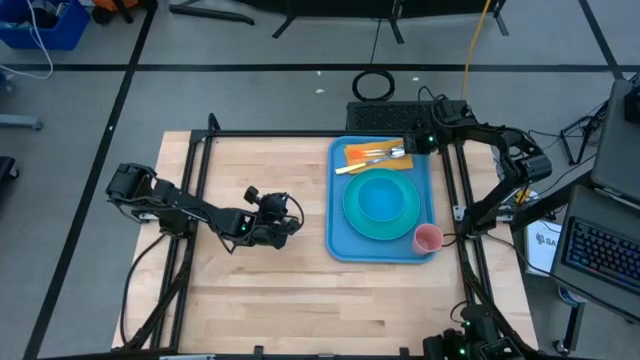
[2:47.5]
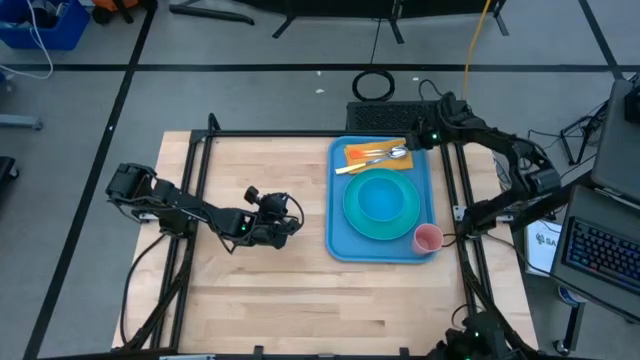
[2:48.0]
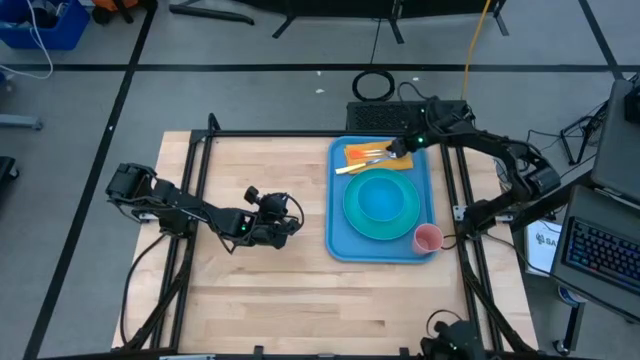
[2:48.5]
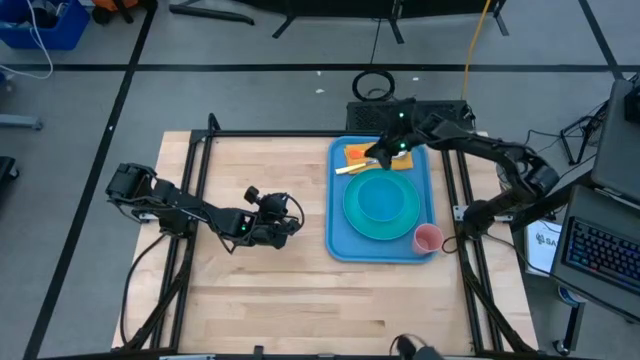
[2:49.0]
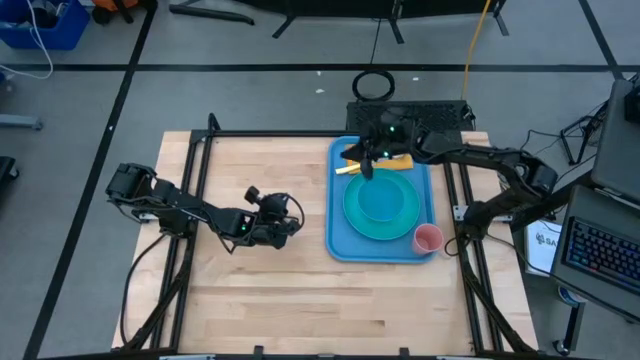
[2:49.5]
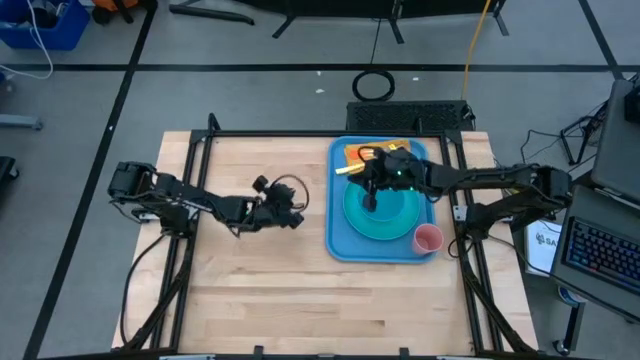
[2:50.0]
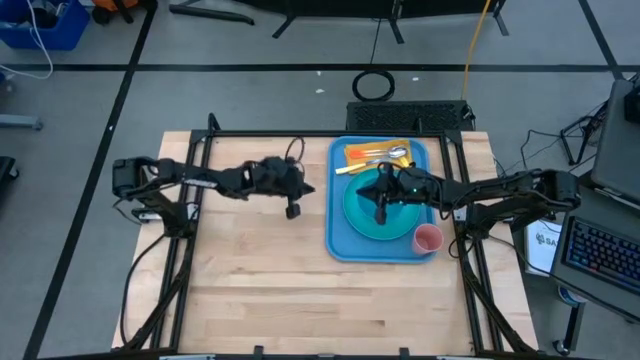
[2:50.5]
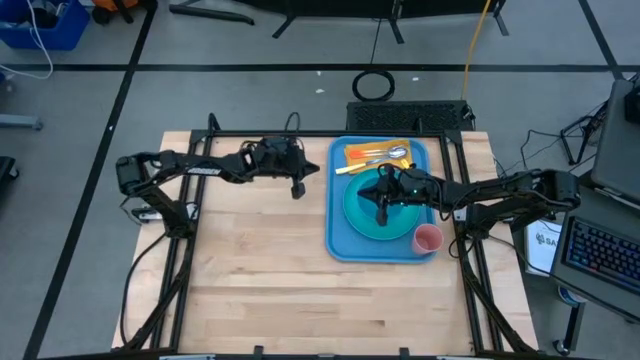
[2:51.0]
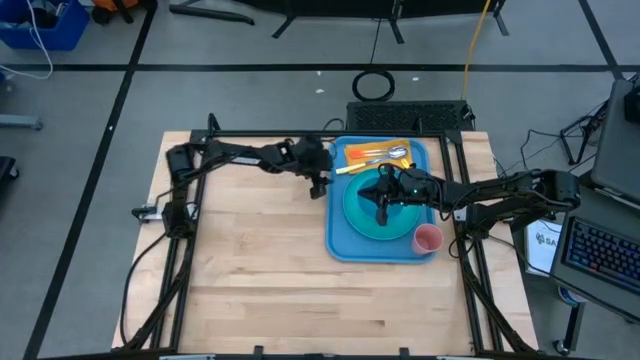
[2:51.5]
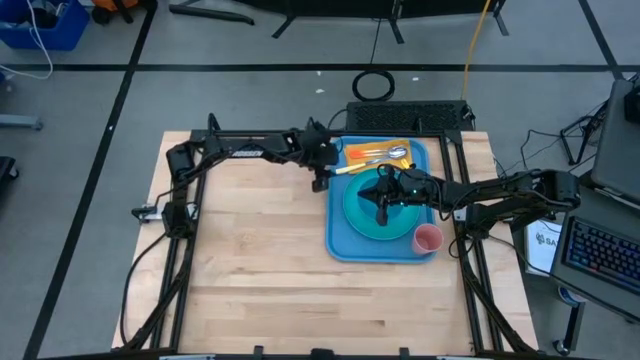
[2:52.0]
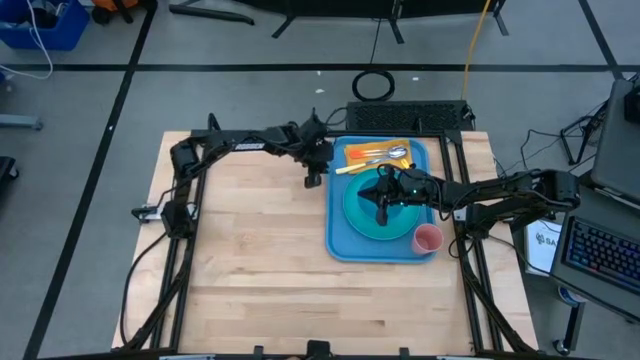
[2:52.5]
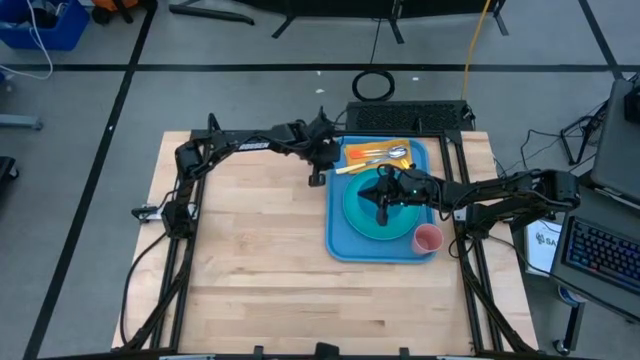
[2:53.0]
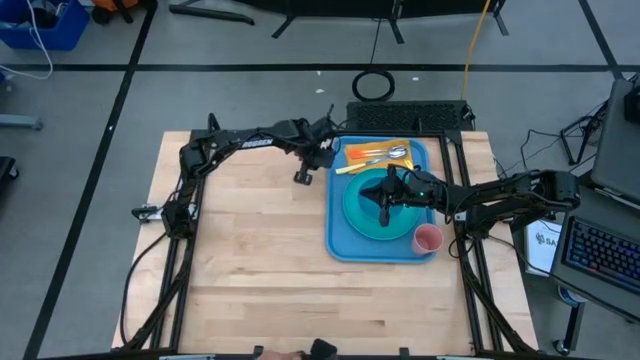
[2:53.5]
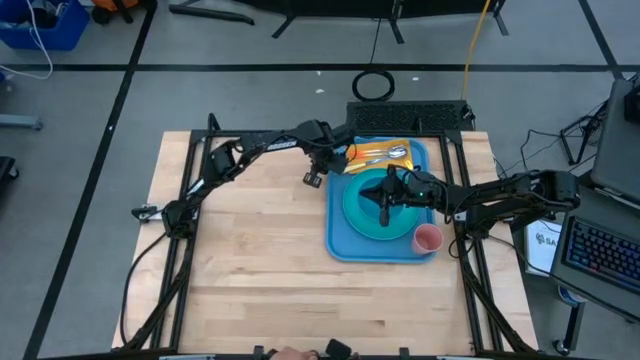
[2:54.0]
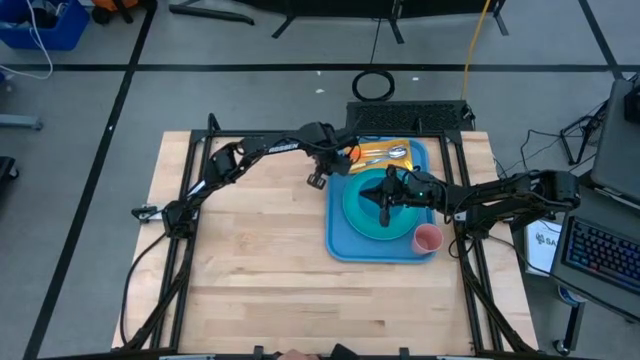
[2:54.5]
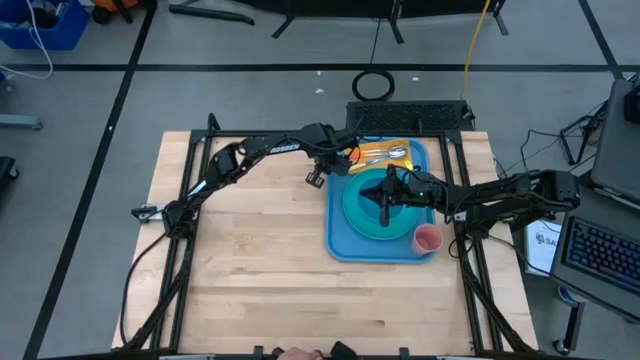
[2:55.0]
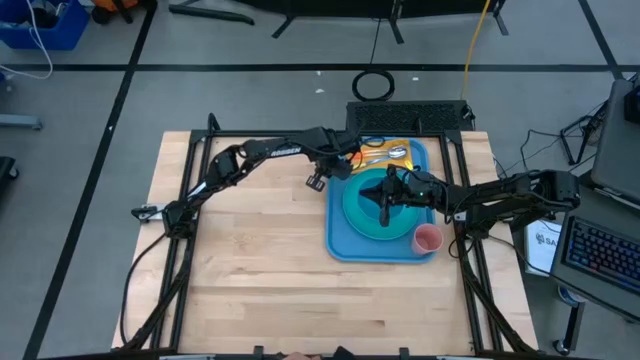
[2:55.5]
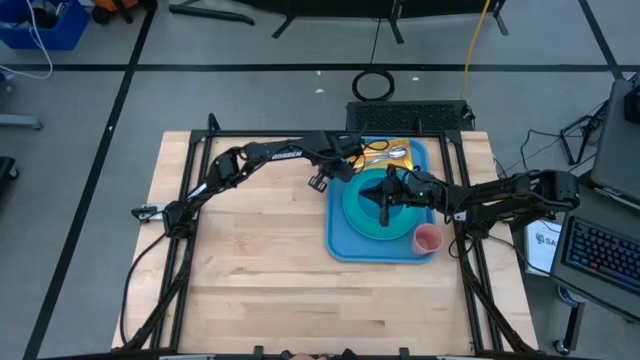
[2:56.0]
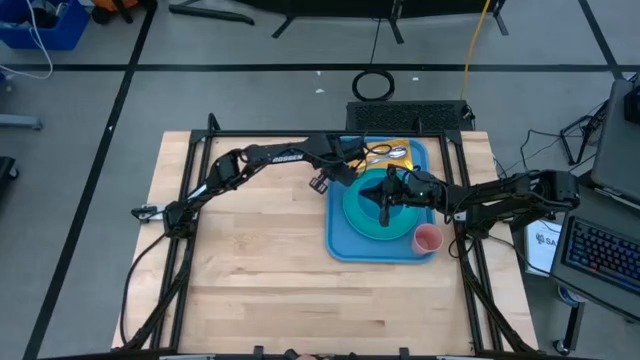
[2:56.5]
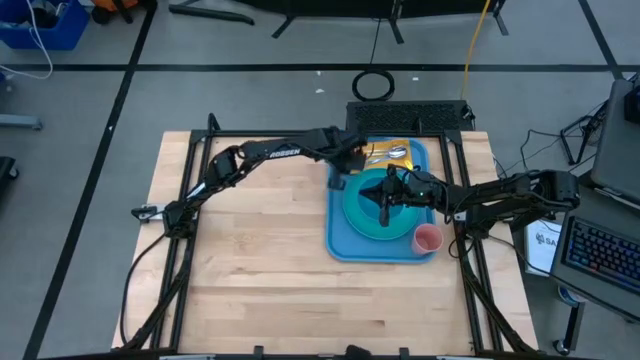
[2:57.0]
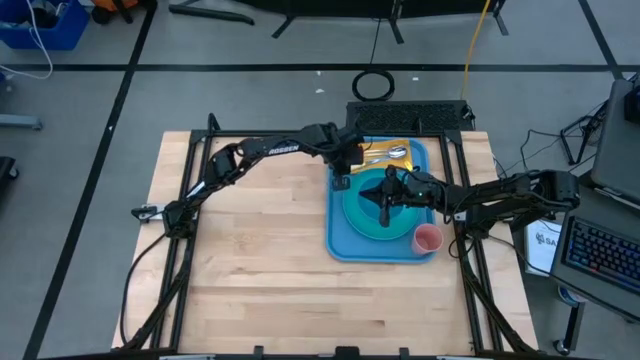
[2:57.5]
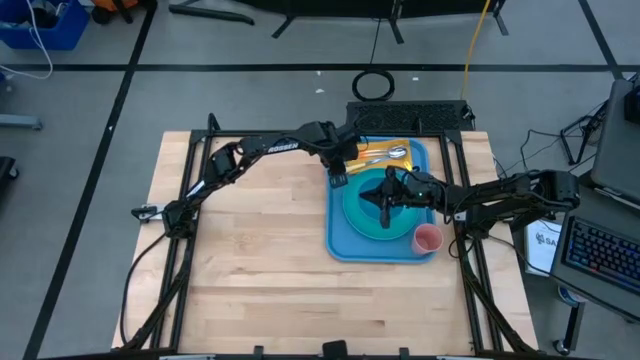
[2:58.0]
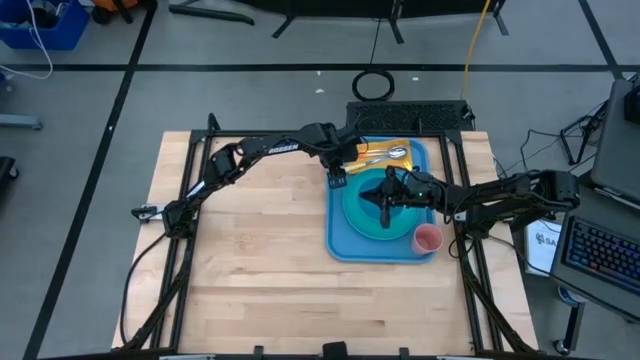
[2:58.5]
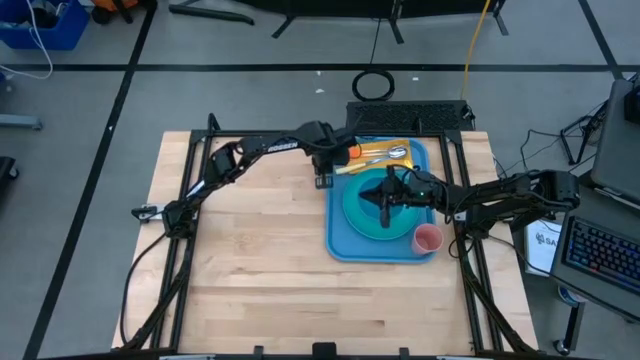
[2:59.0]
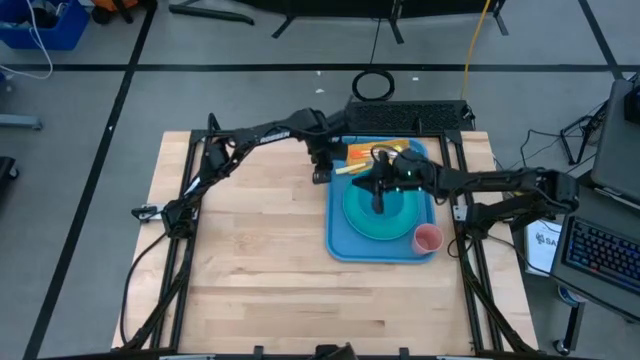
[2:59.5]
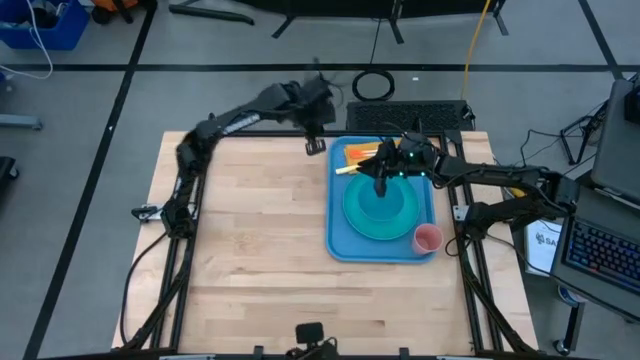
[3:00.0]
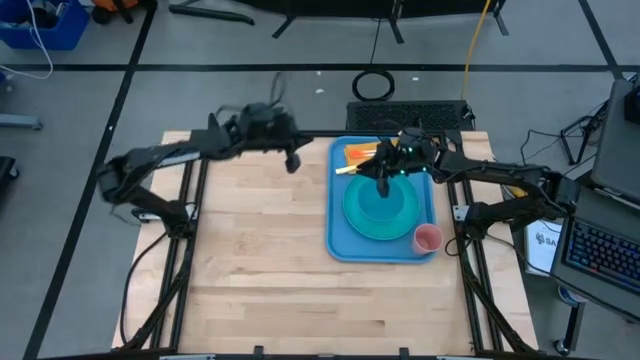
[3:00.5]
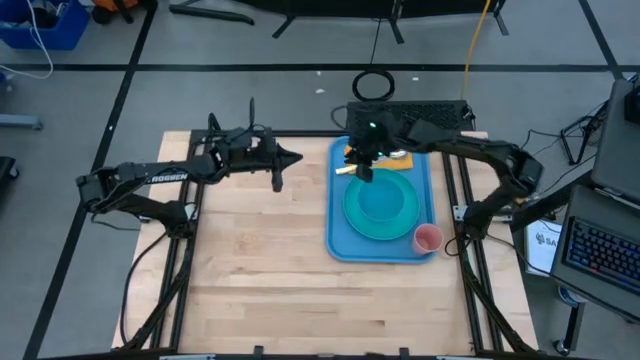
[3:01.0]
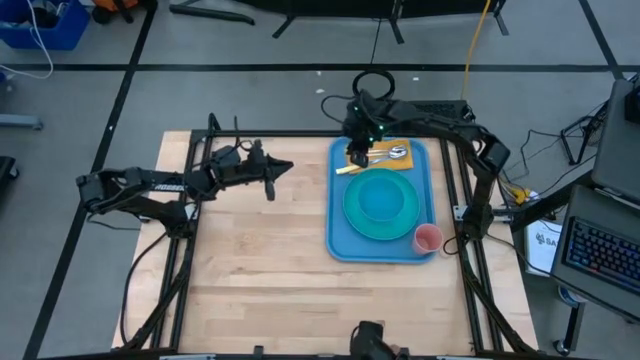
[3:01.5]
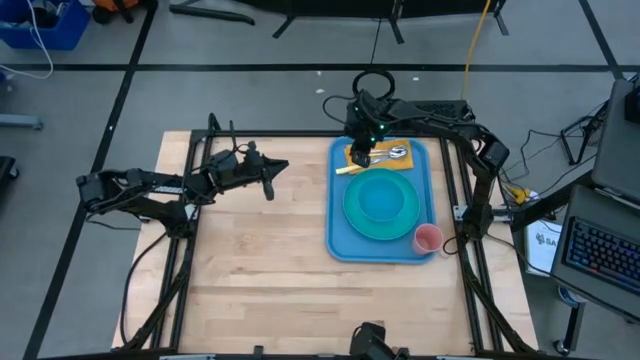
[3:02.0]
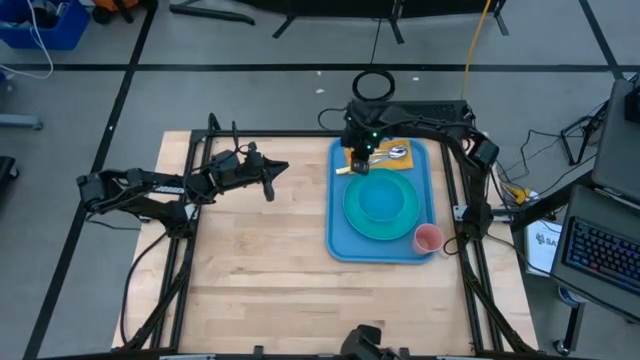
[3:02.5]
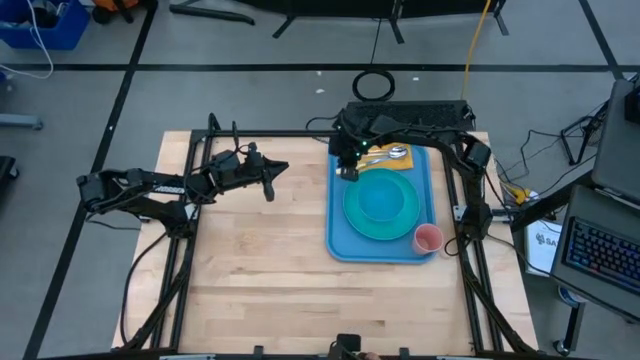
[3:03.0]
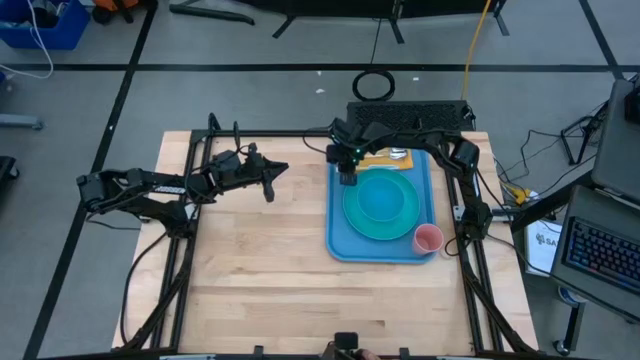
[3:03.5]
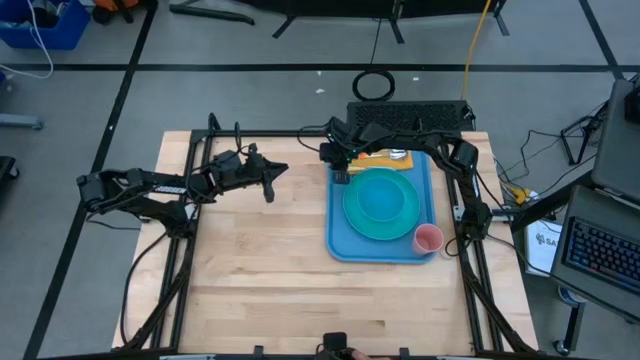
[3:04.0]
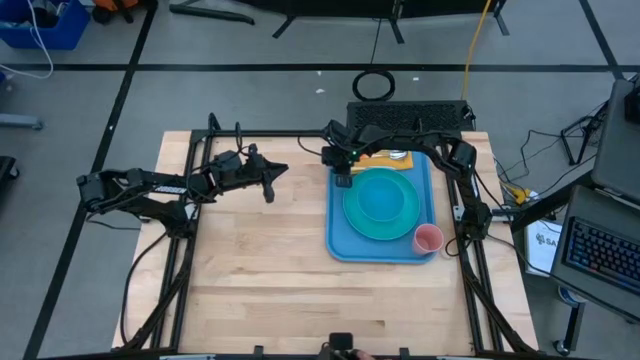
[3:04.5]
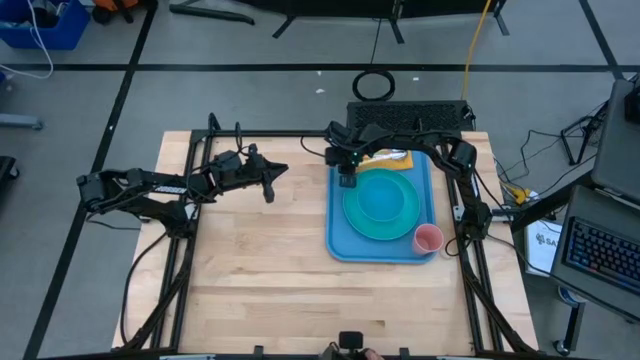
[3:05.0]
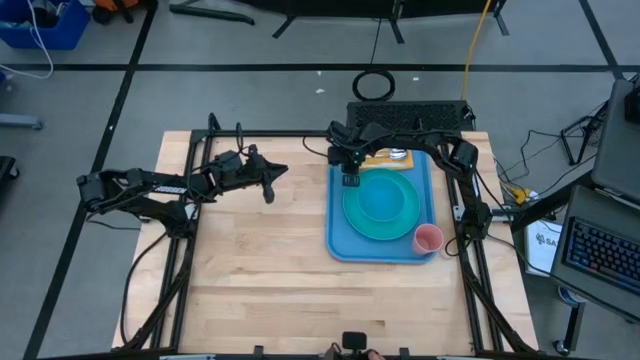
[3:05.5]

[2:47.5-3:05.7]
Task: Set up tray
Adjust the yellow table knife on the yellow table napkin on the blue serving tray

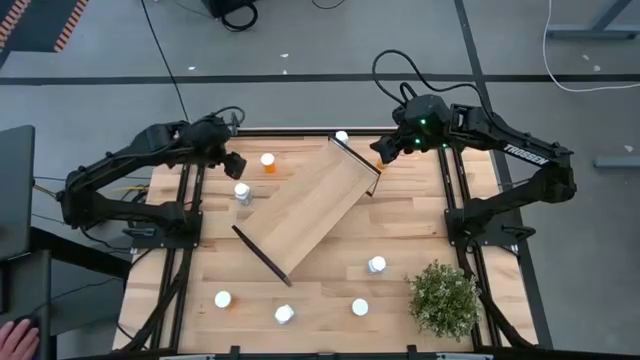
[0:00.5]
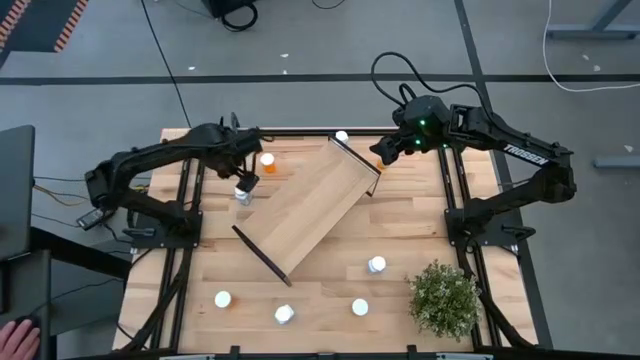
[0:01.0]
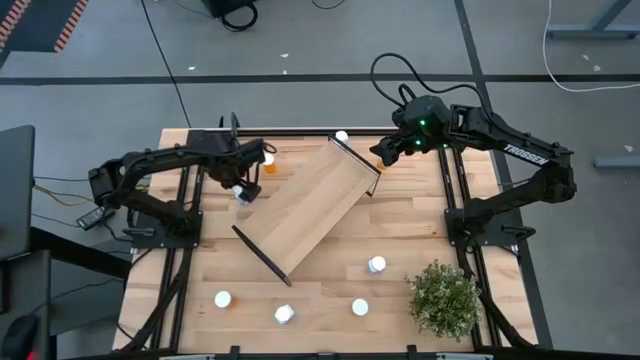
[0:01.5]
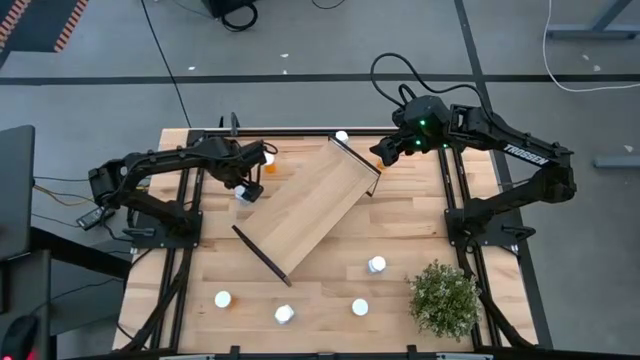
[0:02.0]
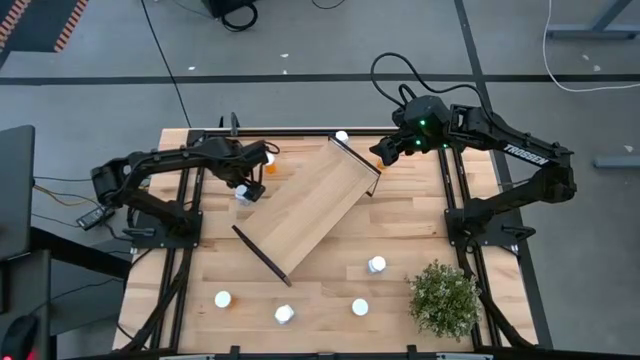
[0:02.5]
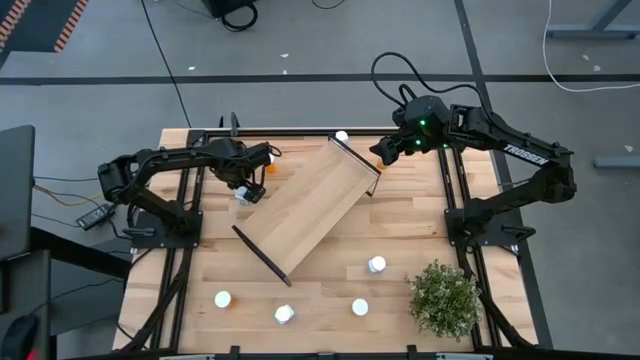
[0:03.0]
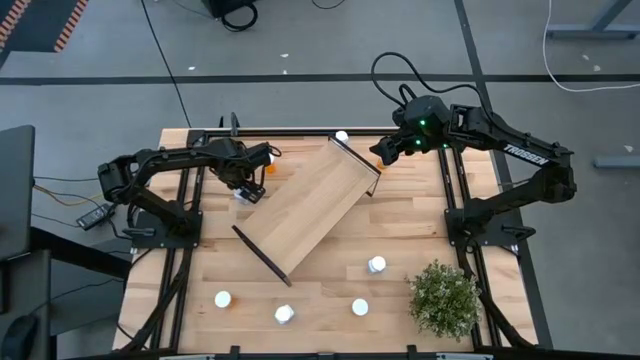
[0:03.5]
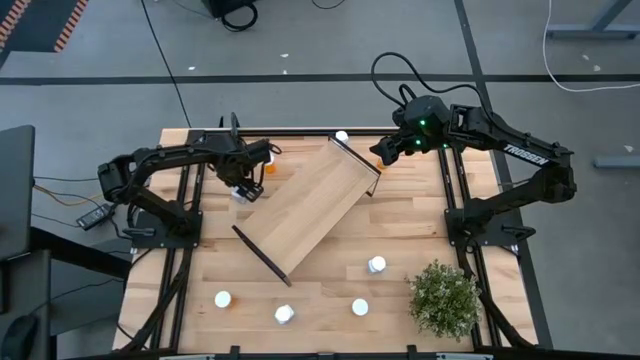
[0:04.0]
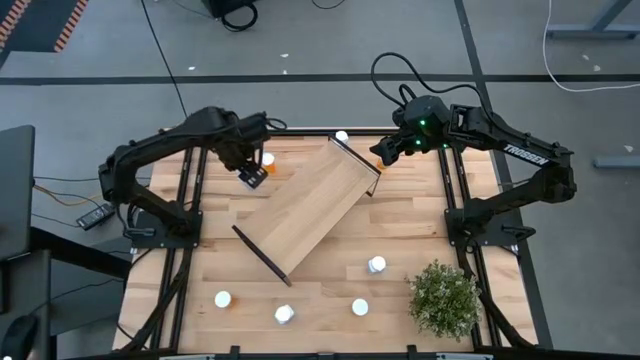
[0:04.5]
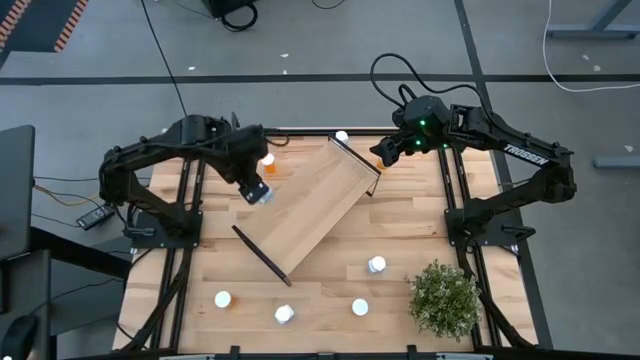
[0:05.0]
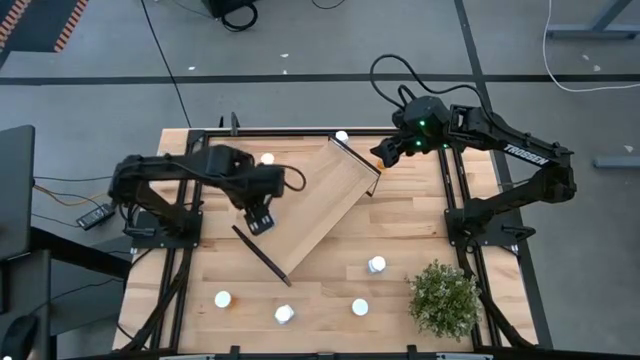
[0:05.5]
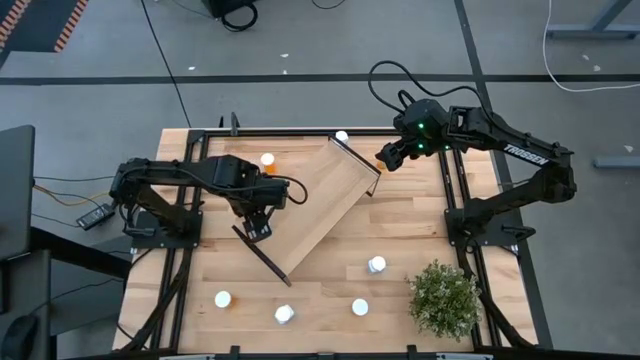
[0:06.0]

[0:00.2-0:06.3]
Task: Pick and place medicine bottles onto shelf by color
Put the white pill bottle on the shelf
